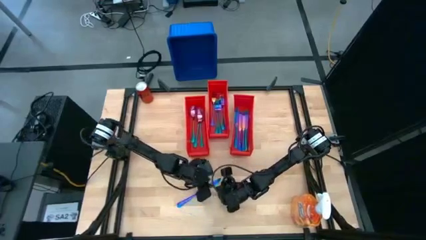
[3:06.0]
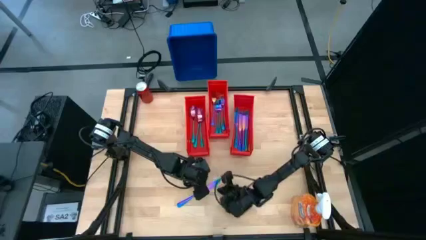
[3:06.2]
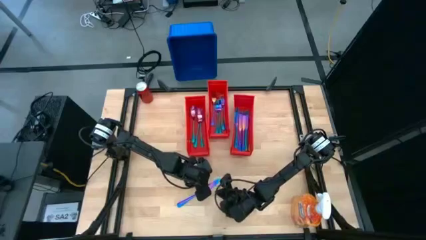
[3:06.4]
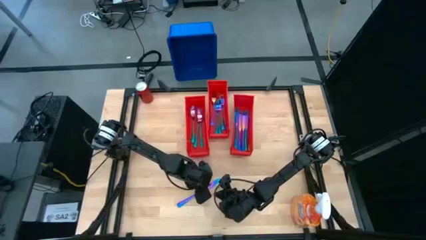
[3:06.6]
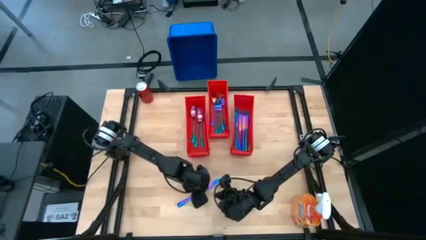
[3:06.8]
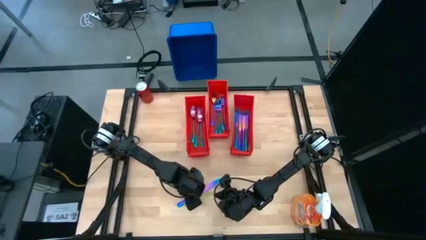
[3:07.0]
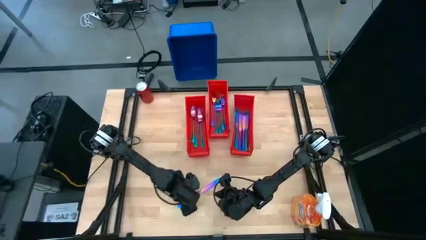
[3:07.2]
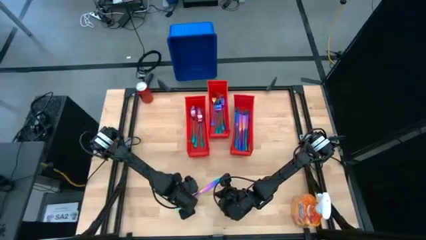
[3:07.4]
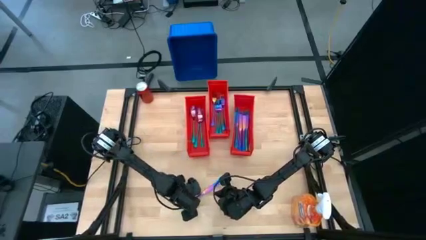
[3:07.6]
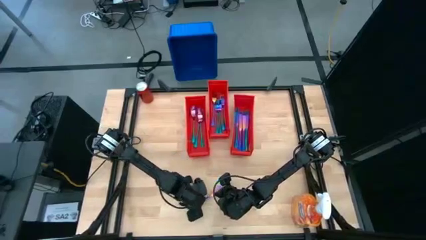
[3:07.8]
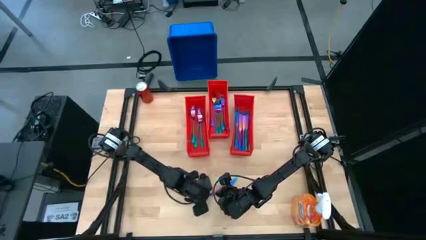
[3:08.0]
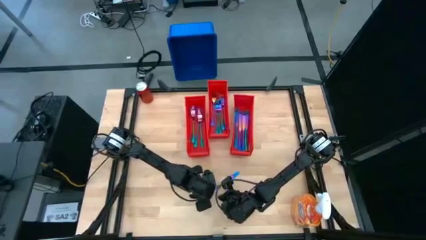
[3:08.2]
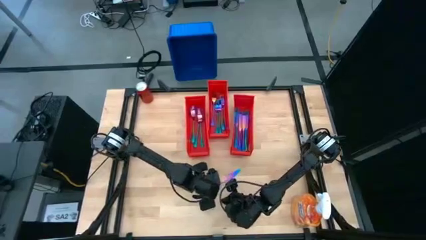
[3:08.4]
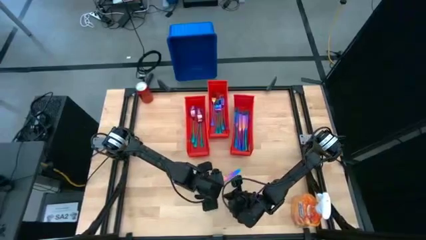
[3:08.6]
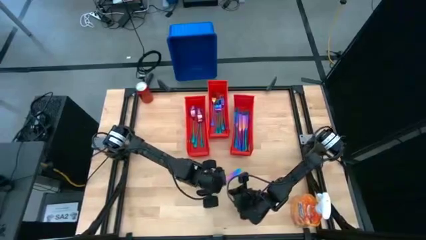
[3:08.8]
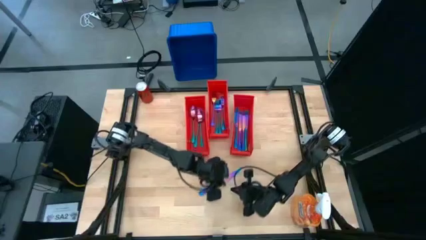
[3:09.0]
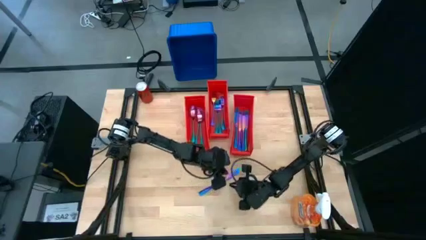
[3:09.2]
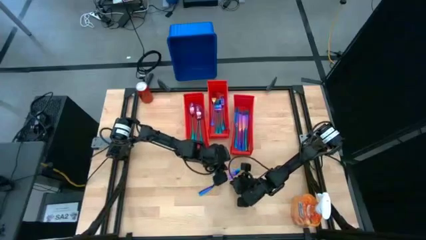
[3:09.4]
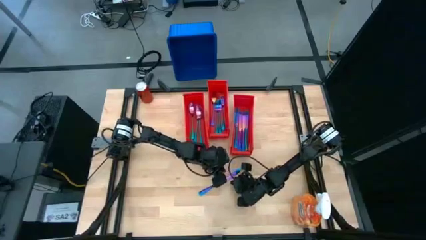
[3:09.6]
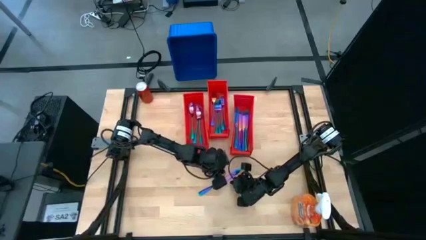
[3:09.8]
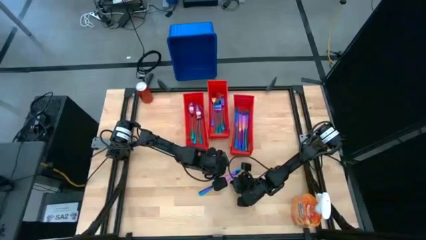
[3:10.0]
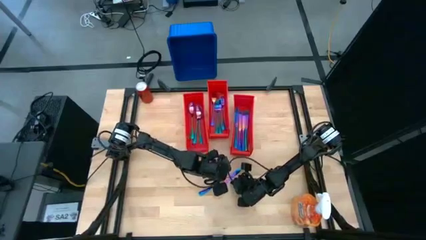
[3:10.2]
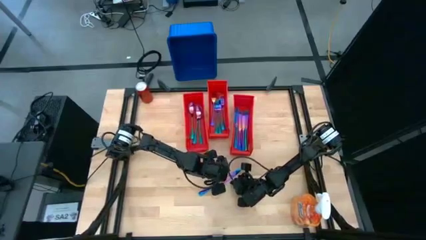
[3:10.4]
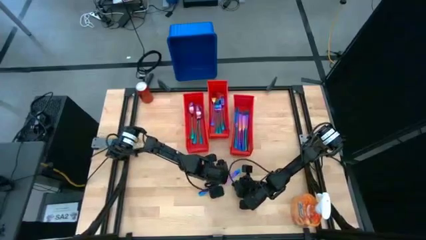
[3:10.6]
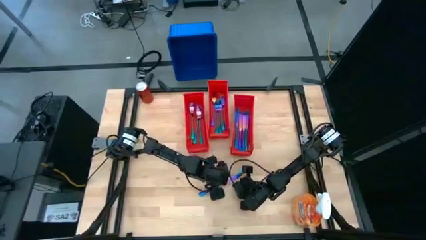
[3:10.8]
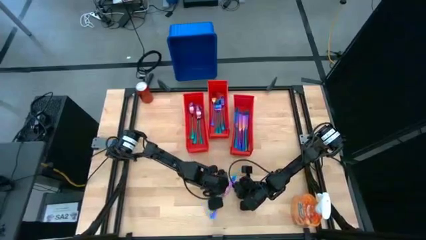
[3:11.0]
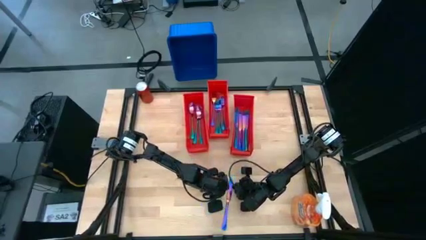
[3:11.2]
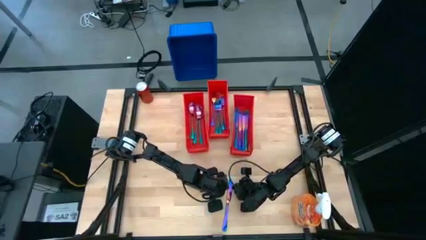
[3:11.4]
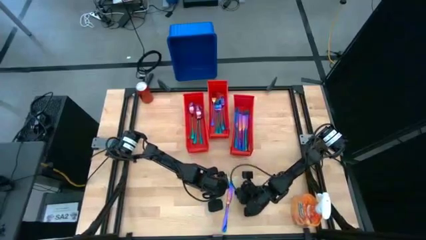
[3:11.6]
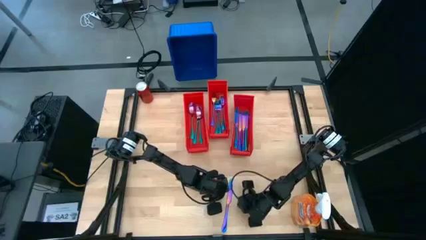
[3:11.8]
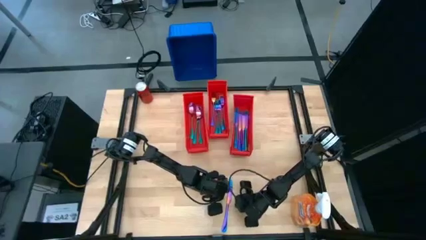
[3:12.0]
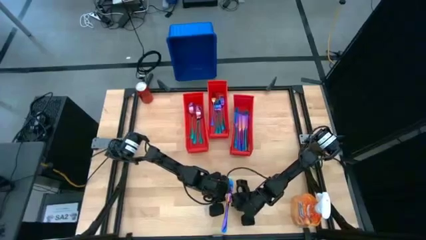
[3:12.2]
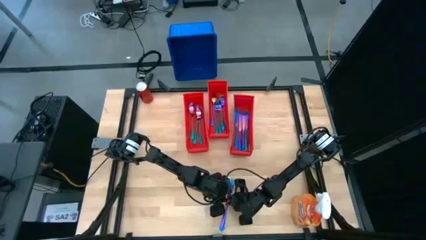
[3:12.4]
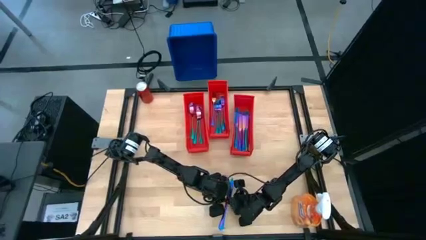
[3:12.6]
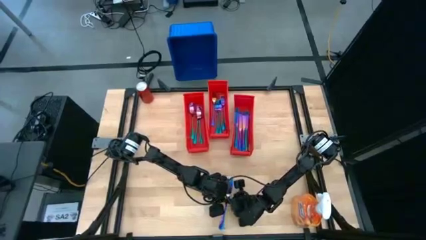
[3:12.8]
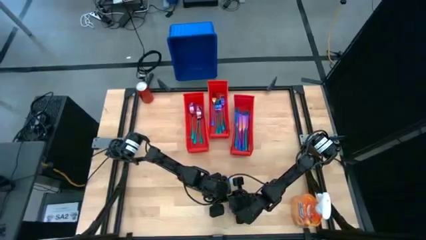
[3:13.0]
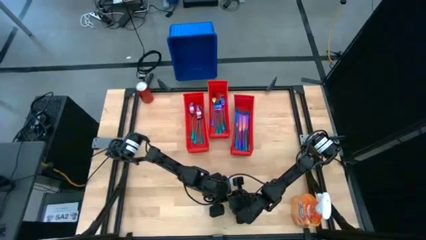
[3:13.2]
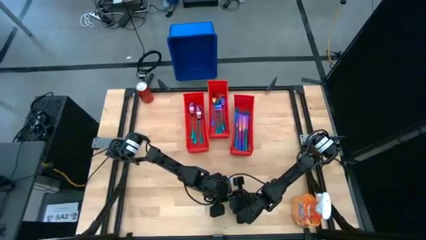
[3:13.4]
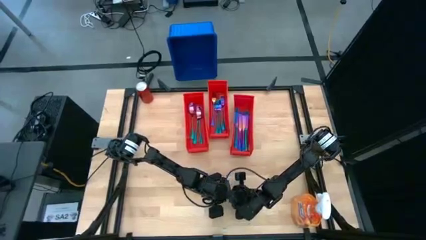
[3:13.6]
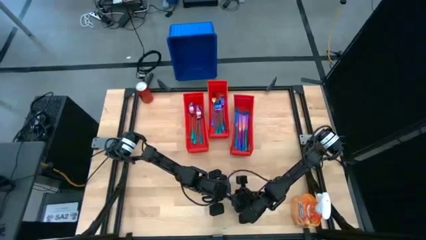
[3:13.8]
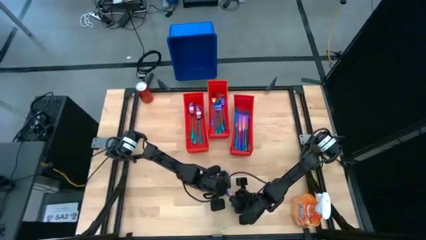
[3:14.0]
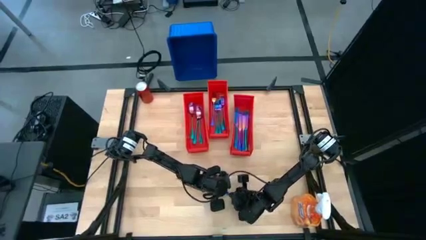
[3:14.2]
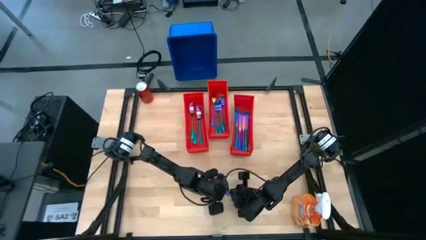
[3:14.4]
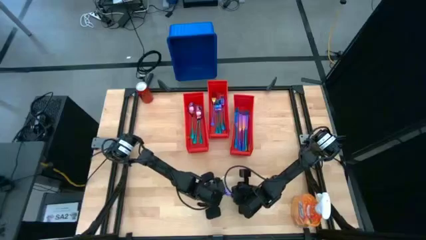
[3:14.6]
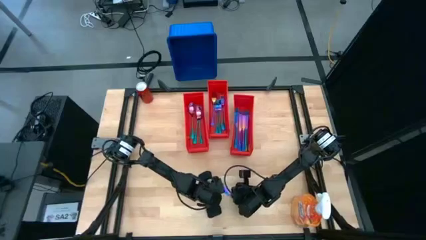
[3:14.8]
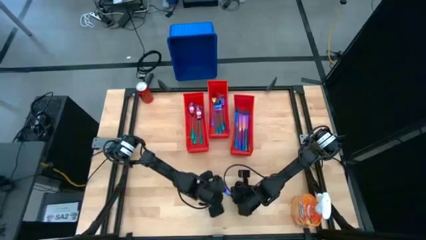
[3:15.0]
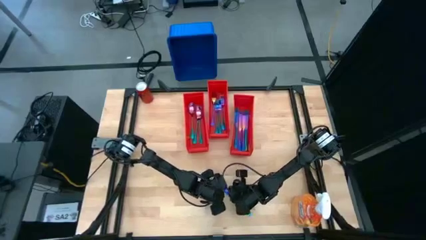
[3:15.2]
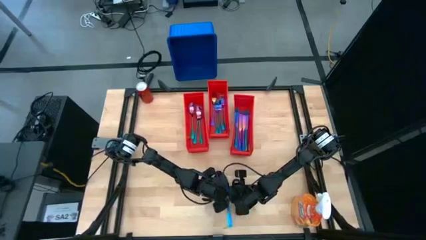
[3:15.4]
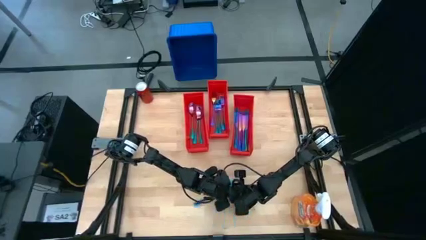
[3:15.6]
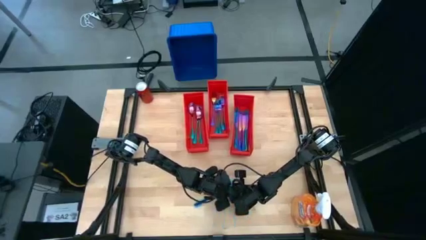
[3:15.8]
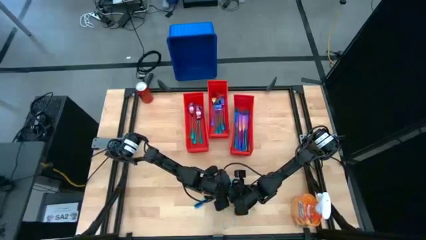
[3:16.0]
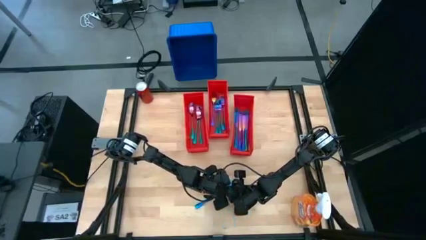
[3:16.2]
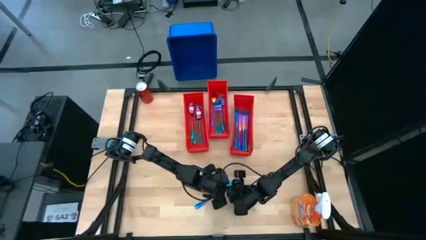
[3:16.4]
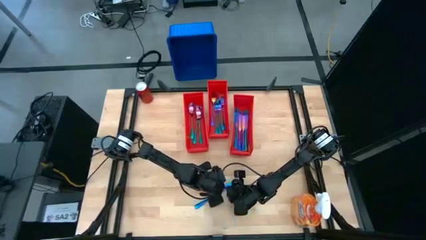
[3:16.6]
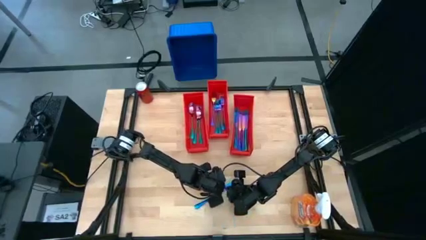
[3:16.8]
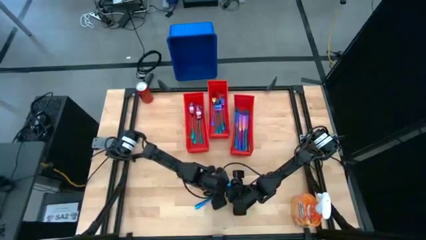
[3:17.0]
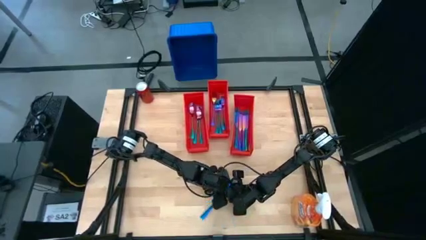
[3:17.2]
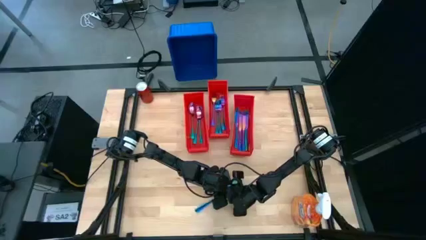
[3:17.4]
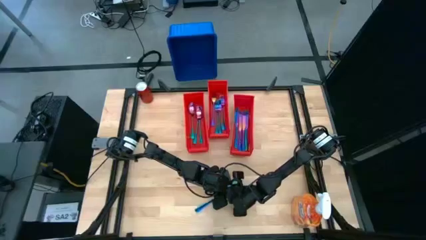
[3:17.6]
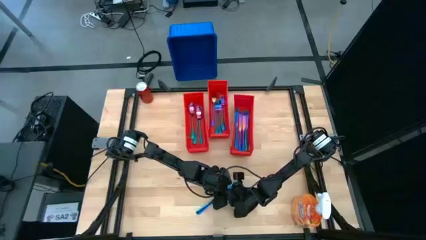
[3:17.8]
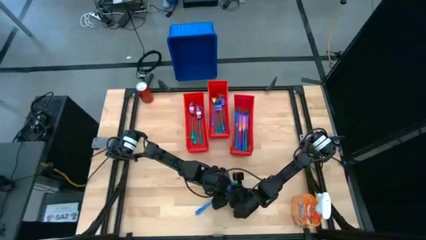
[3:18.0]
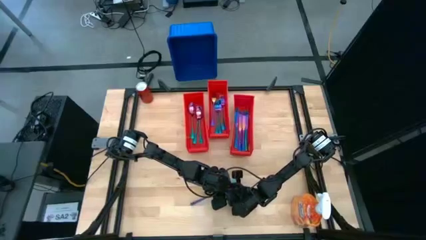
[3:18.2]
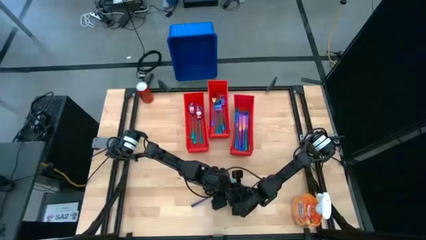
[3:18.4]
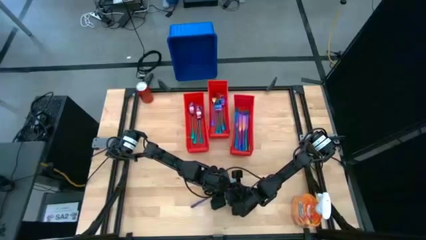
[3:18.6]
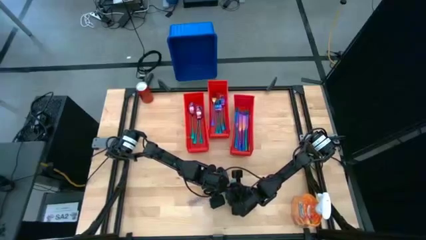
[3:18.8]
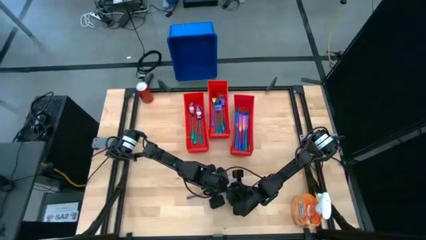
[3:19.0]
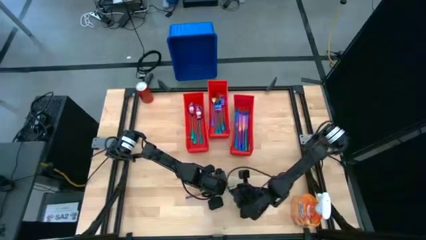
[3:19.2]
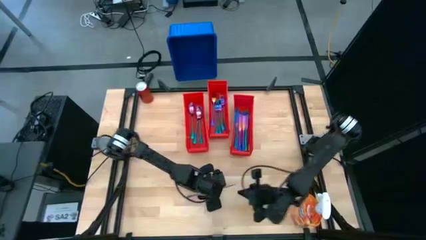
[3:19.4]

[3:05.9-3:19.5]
Task: Sort silverware
Put the iridescent knife into the right orange bin
